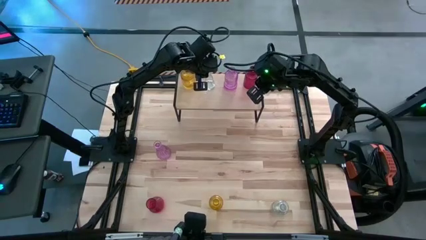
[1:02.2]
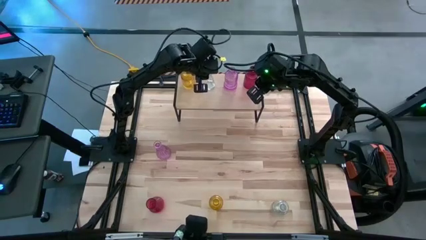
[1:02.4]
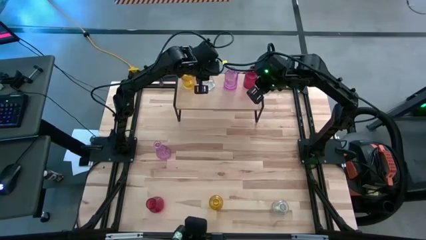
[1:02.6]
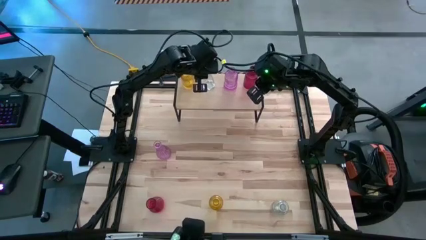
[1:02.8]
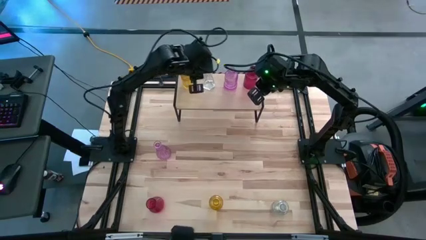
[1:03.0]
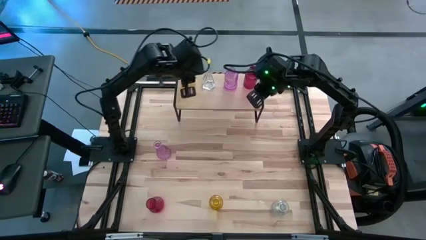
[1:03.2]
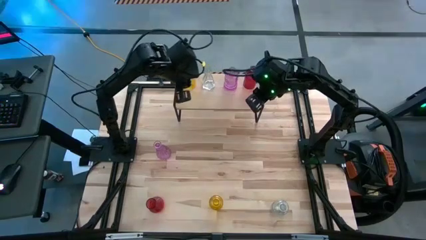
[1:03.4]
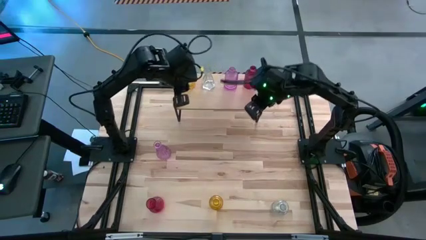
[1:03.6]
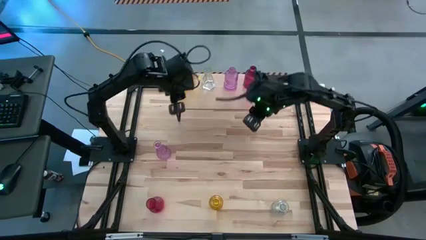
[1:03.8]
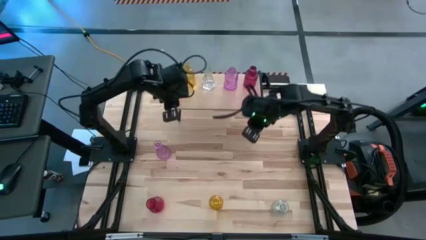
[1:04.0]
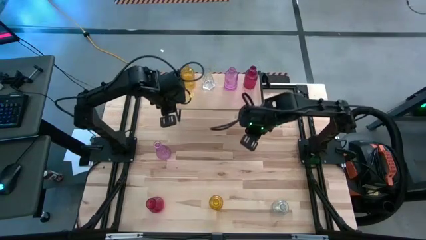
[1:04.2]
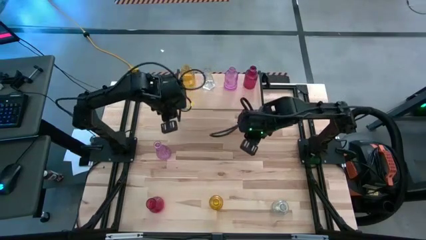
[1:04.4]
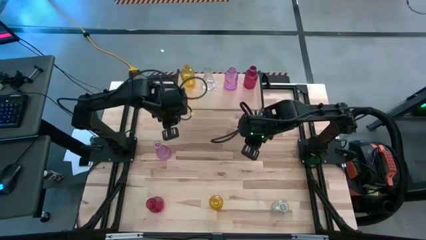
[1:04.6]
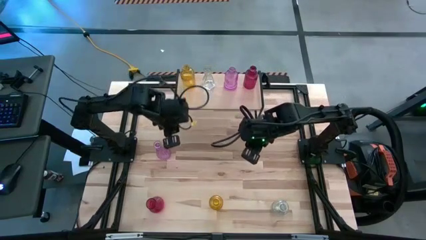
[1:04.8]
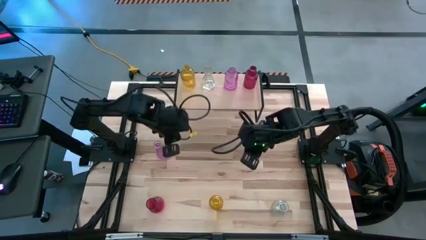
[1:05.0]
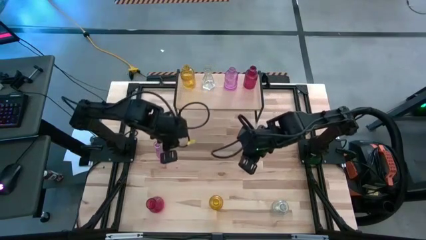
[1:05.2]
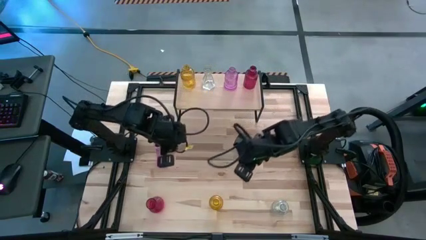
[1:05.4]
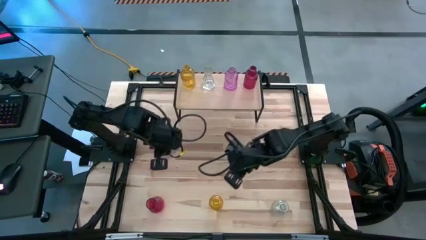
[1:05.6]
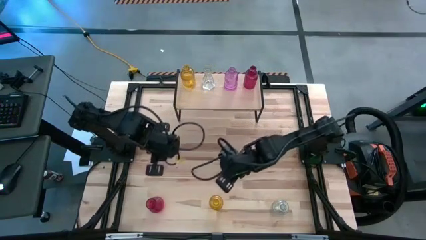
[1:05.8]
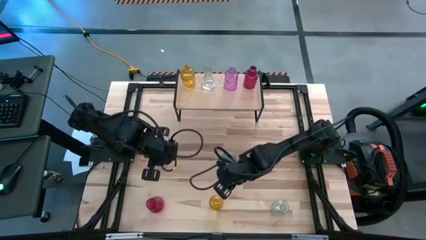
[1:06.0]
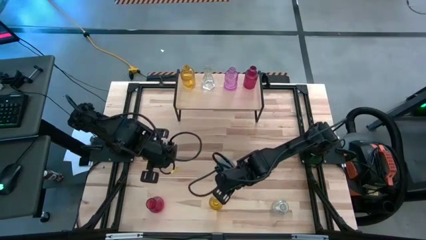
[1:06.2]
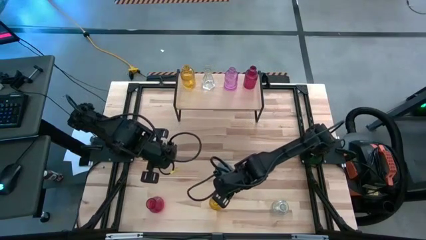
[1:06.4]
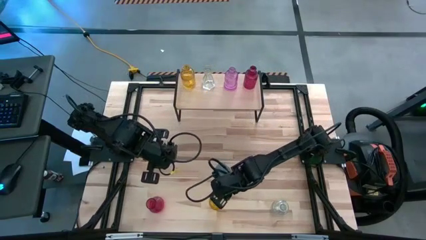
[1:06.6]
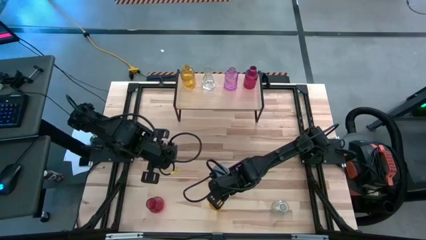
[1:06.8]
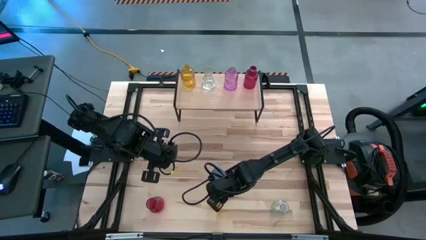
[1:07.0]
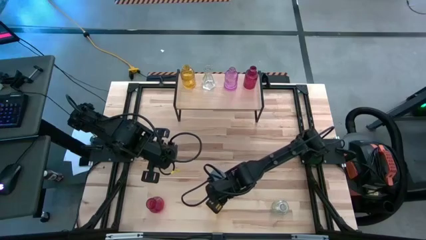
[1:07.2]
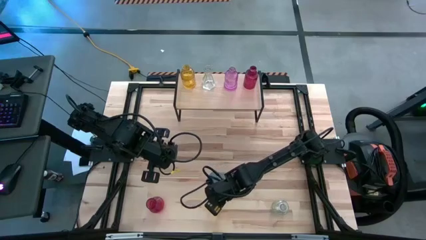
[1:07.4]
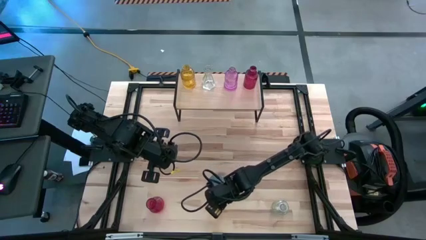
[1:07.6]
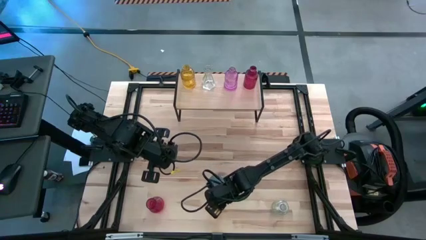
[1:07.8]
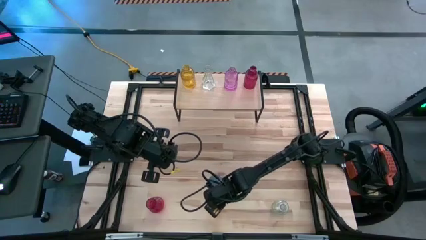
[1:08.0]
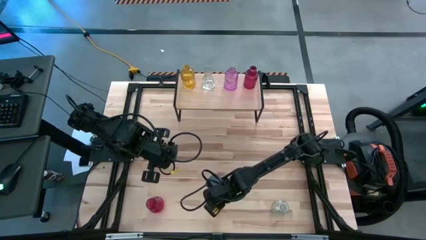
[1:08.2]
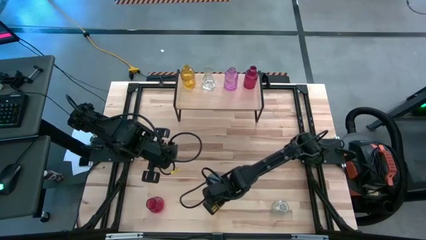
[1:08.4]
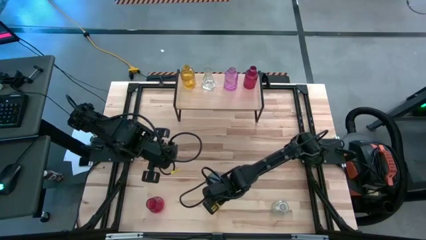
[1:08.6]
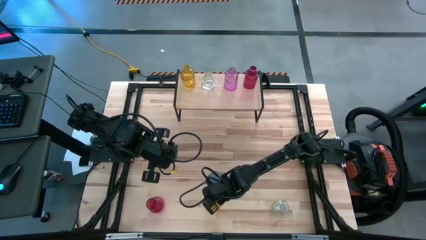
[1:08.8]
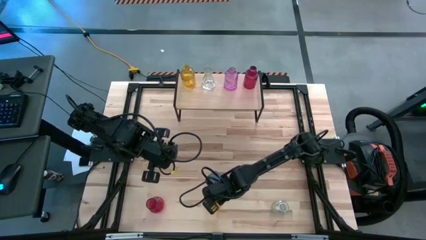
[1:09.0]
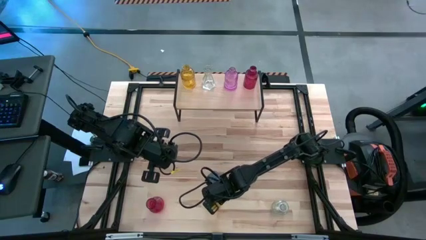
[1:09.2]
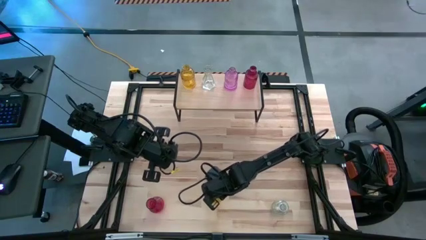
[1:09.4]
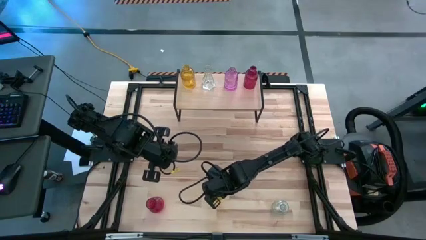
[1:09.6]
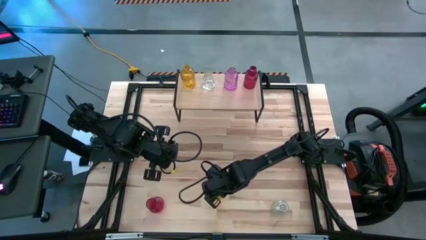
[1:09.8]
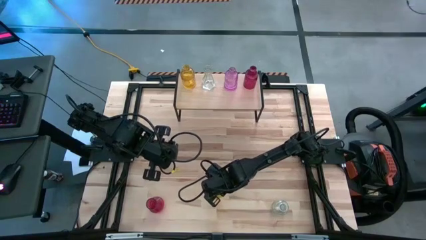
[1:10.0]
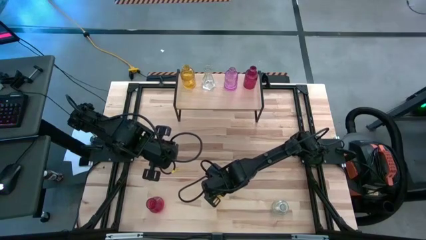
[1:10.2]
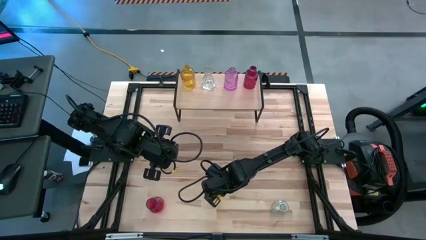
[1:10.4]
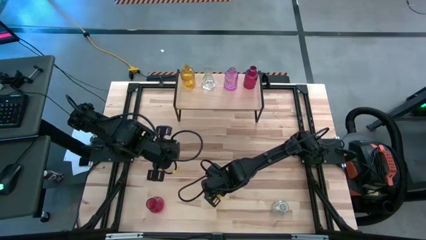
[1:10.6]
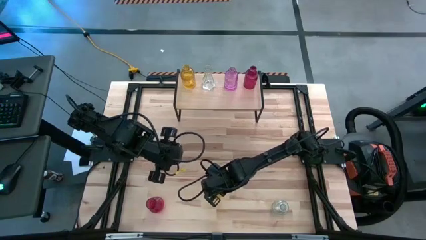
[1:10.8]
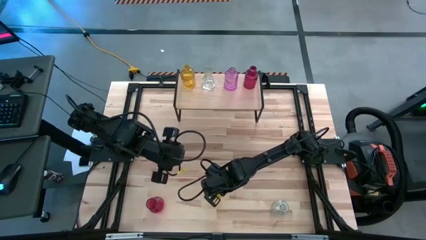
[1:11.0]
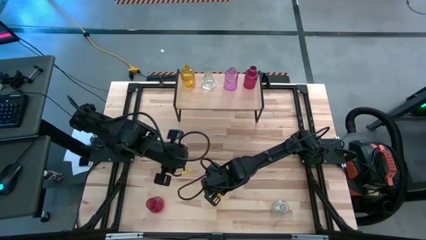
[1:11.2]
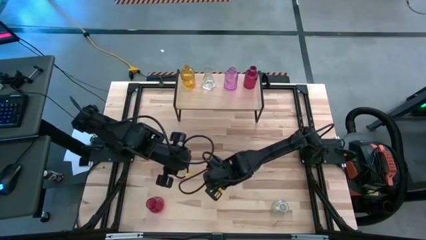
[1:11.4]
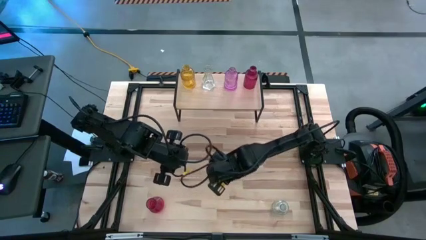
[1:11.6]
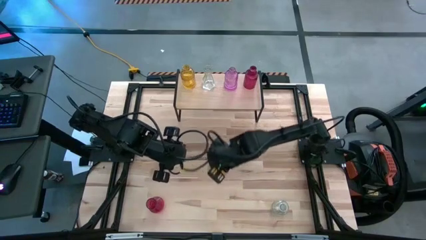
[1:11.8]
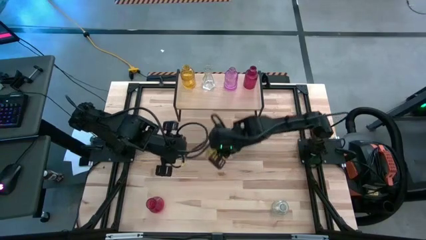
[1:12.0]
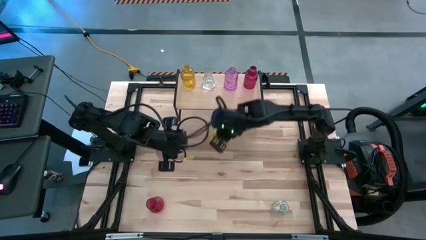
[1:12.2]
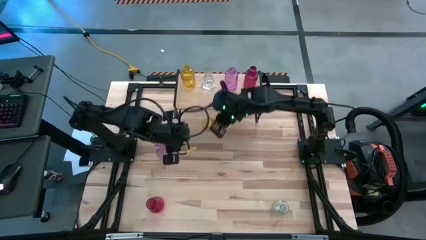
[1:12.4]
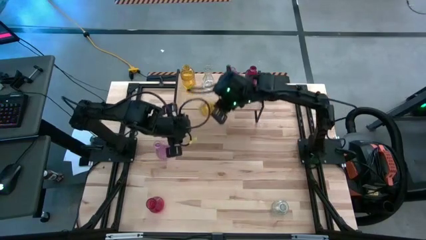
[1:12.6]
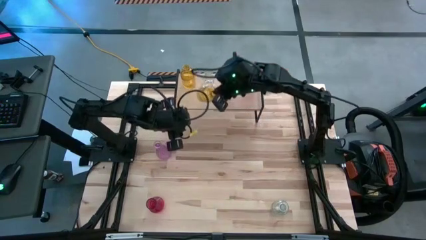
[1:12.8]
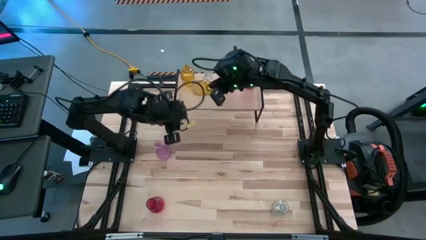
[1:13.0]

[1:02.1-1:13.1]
Task: sort vases onto shelf
Put the yellow vase on the shelf aligned with the other yellow vase

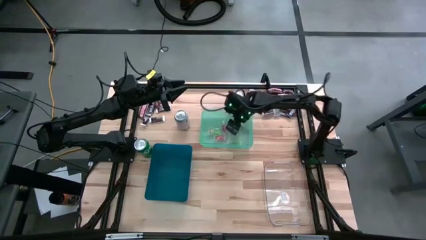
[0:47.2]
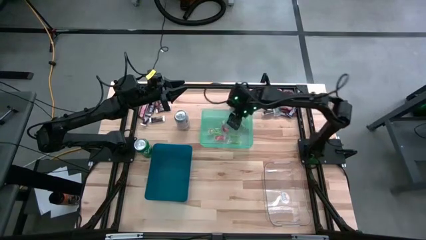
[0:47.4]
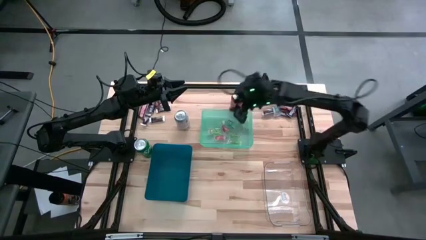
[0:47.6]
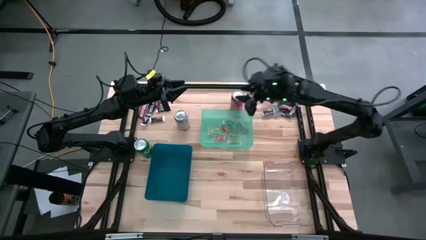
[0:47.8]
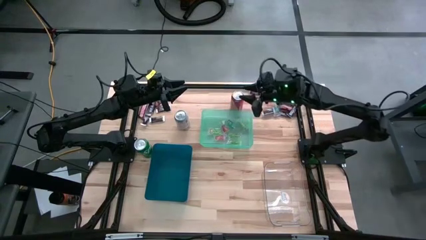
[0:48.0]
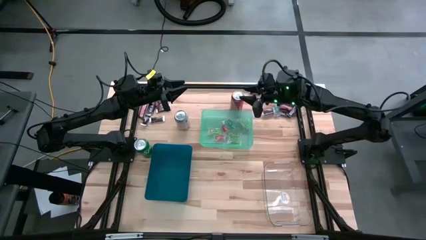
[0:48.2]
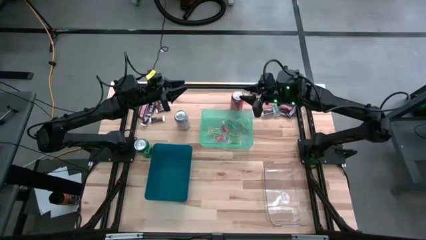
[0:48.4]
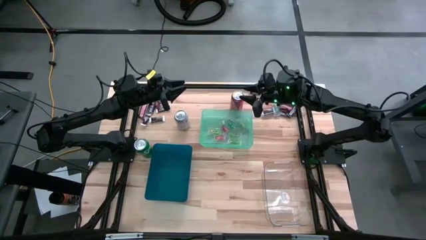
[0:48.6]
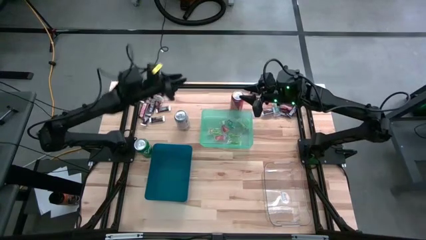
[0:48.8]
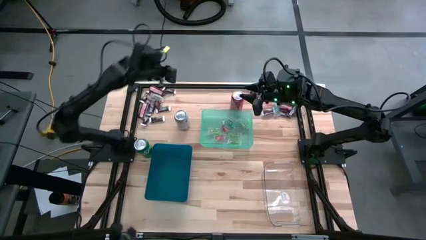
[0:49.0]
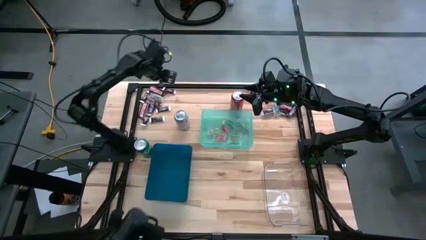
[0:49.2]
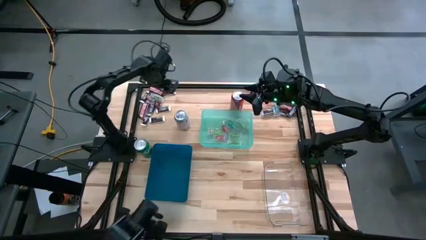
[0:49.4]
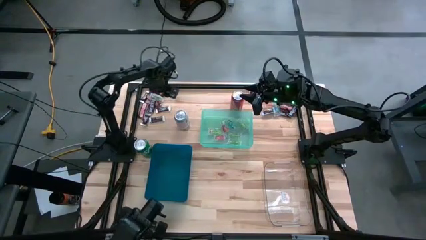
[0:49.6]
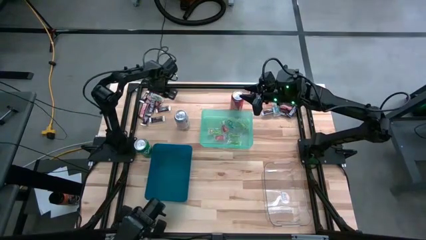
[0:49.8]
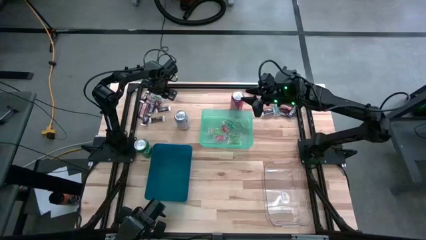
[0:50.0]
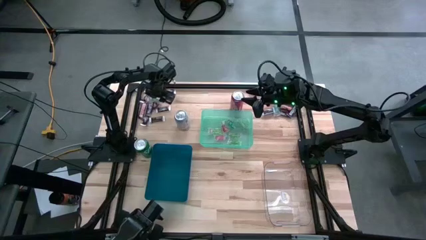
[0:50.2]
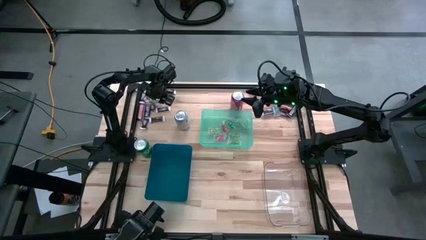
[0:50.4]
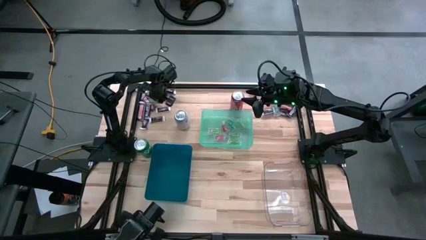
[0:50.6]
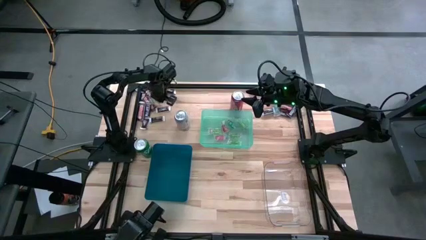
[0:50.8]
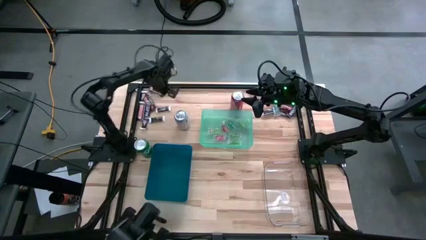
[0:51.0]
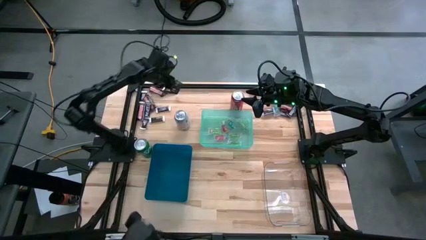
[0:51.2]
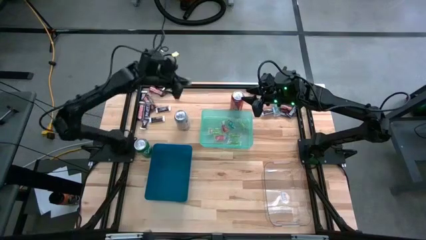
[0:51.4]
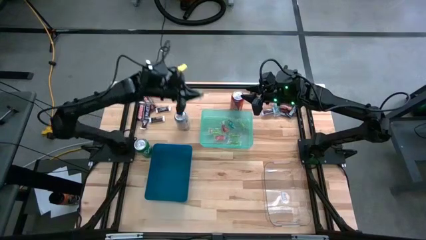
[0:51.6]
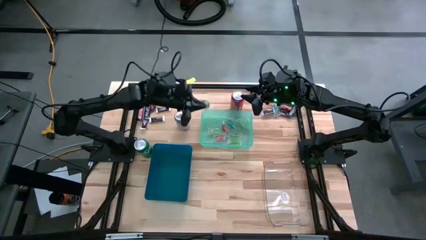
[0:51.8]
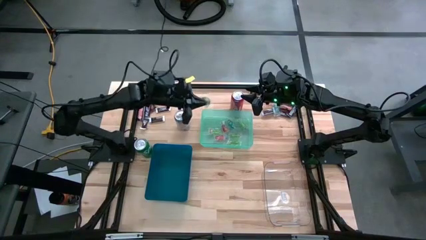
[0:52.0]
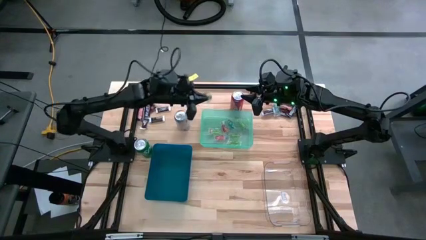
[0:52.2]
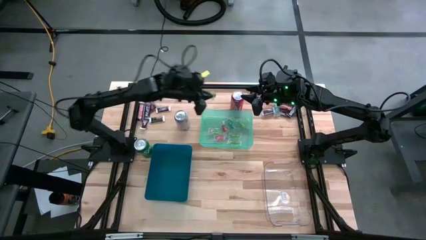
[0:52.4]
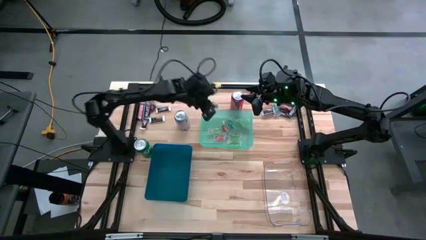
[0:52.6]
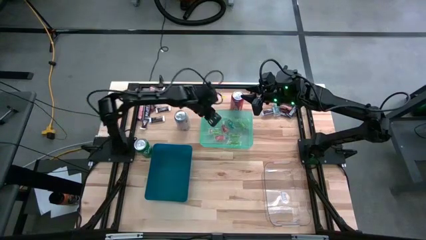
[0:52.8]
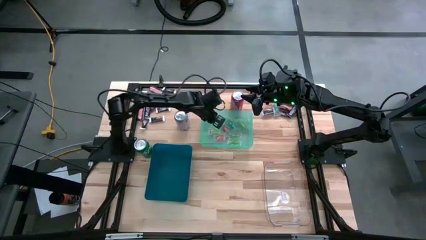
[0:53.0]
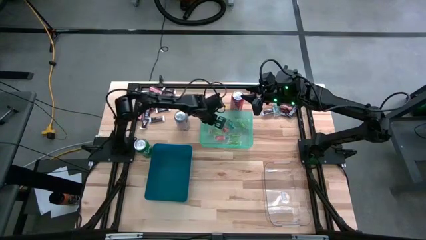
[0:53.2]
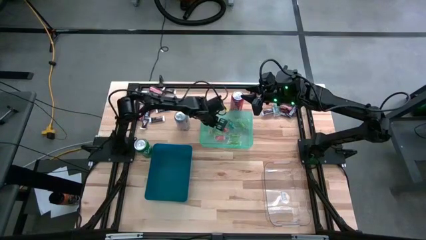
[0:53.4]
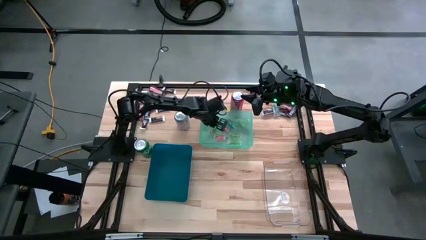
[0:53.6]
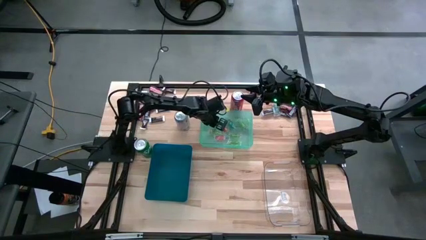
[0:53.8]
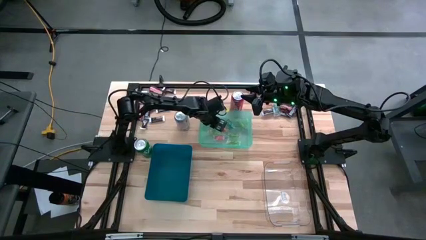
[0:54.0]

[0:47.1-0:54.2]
Task: Organize candy in baskets
Put the green gummy into the green bin
